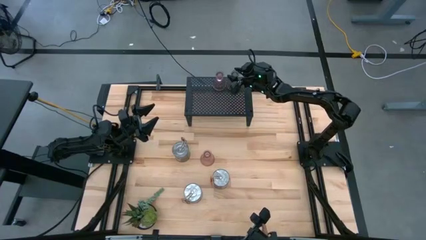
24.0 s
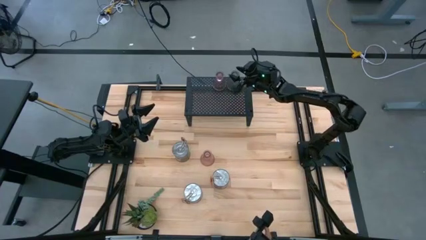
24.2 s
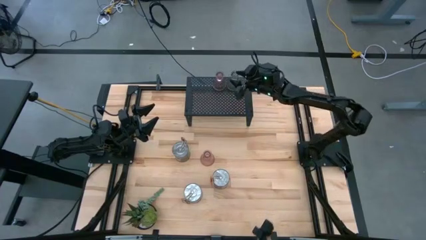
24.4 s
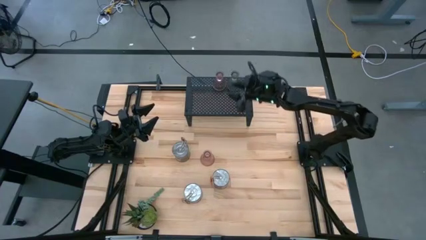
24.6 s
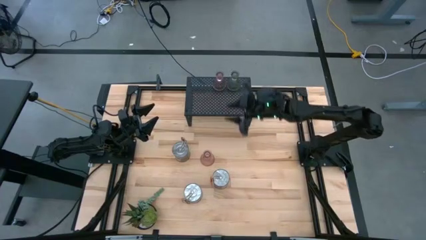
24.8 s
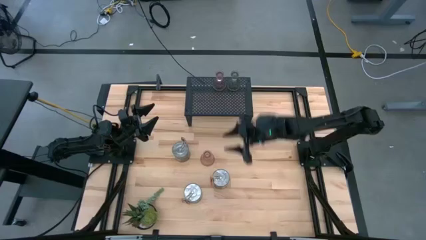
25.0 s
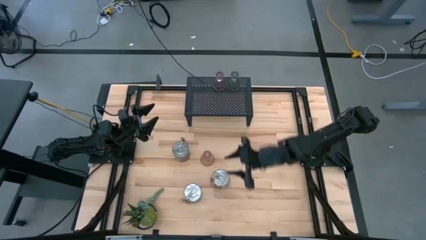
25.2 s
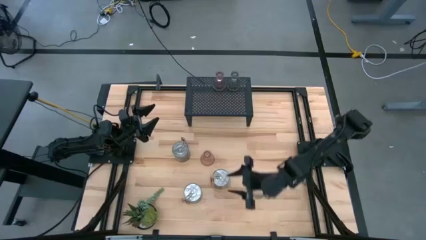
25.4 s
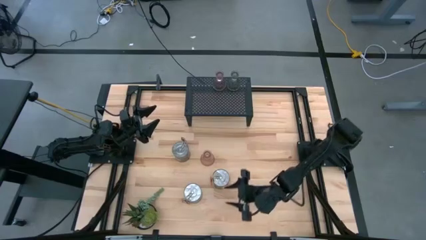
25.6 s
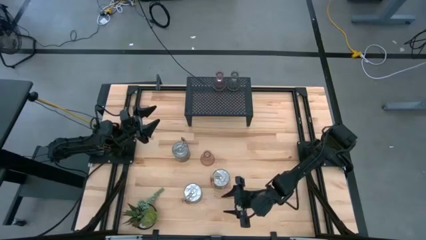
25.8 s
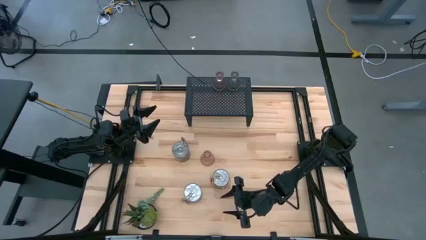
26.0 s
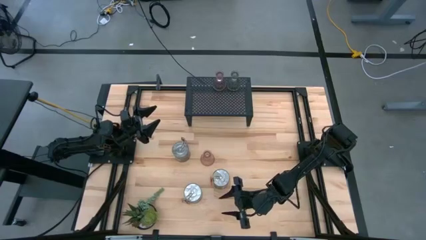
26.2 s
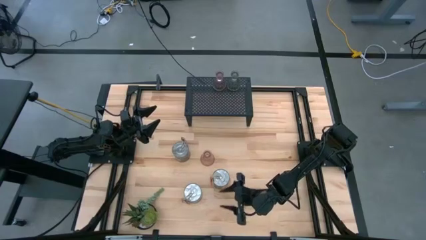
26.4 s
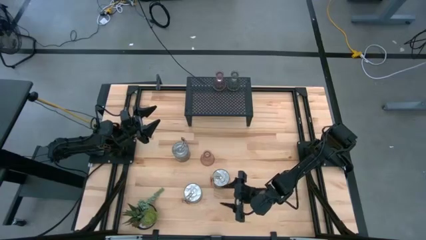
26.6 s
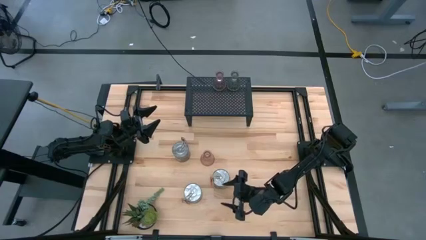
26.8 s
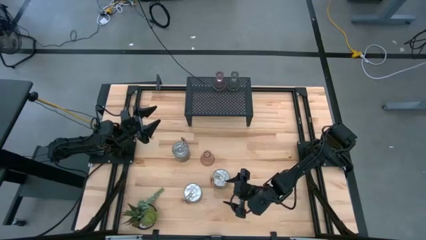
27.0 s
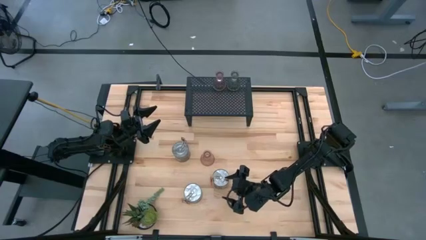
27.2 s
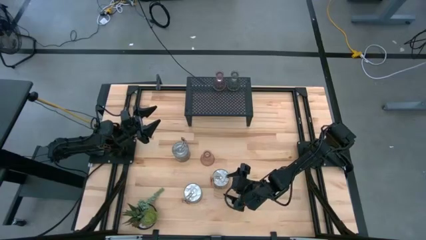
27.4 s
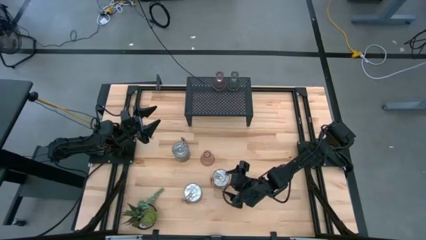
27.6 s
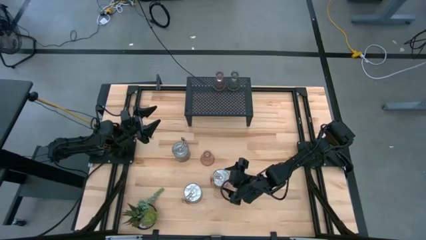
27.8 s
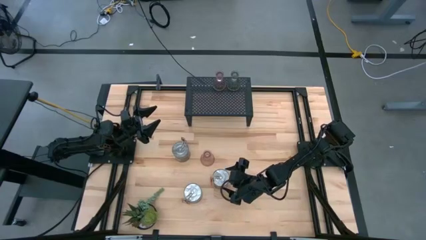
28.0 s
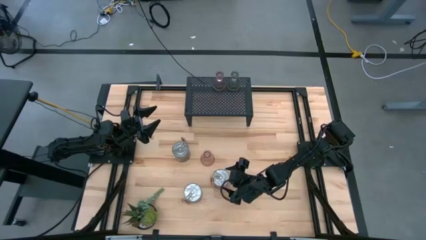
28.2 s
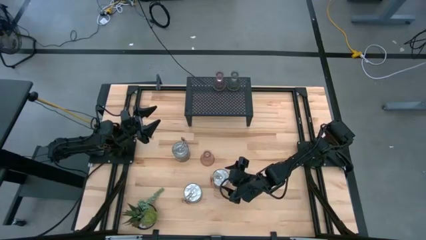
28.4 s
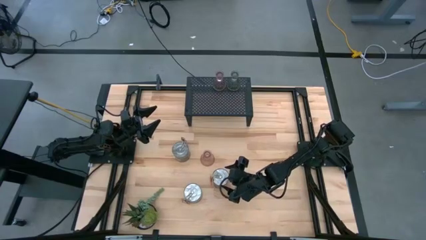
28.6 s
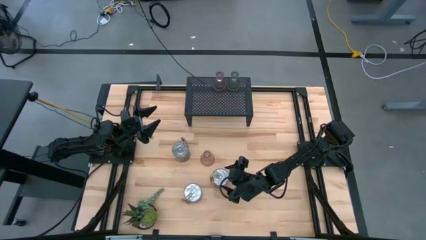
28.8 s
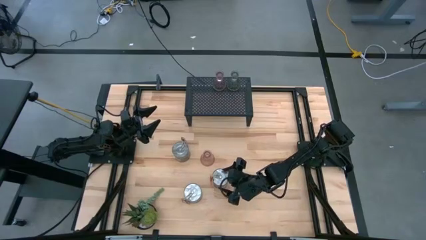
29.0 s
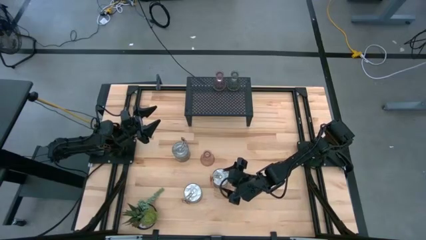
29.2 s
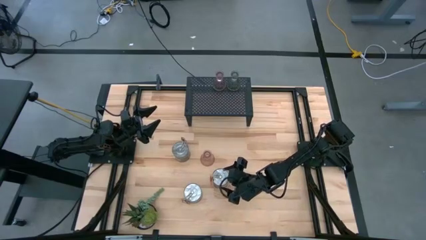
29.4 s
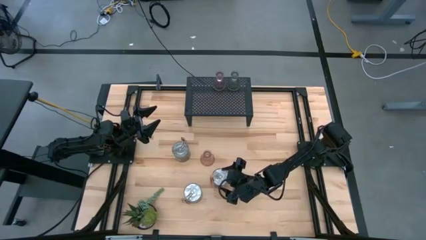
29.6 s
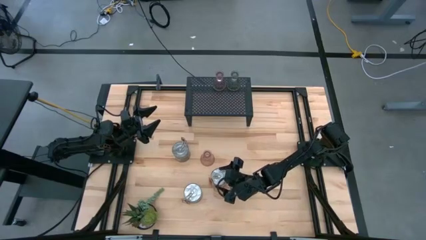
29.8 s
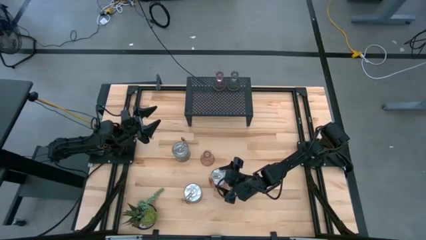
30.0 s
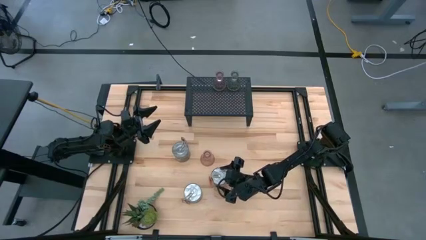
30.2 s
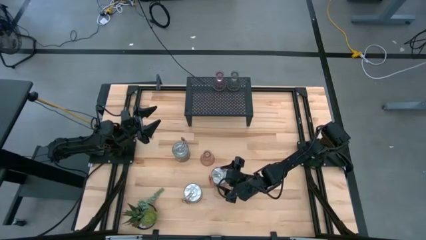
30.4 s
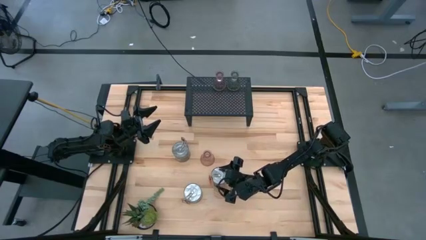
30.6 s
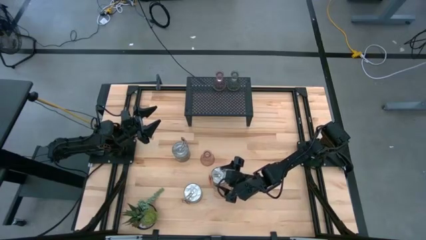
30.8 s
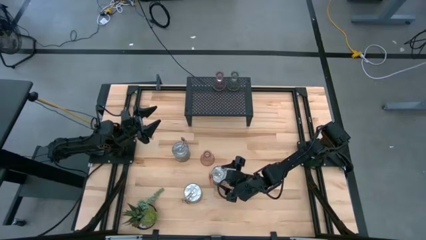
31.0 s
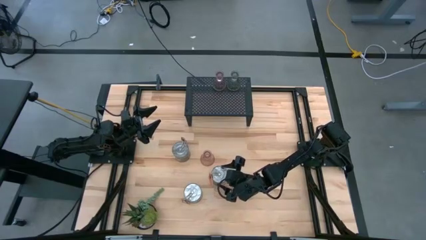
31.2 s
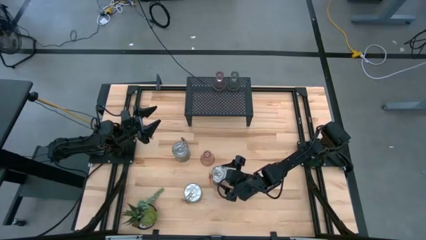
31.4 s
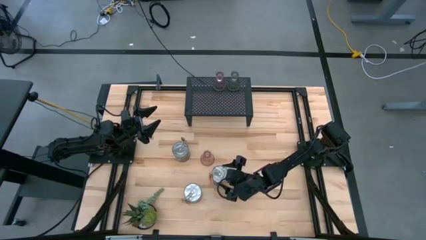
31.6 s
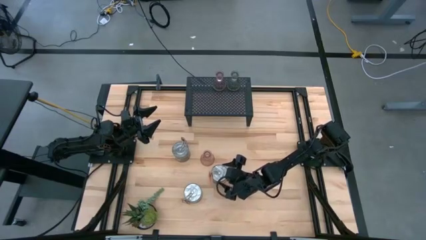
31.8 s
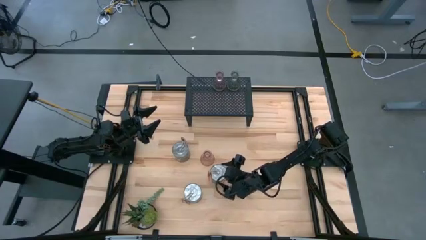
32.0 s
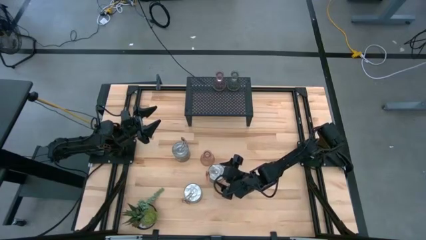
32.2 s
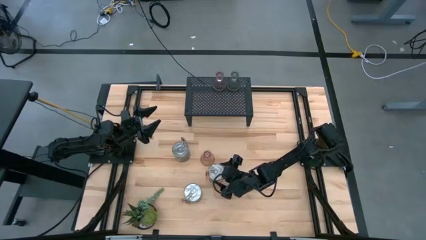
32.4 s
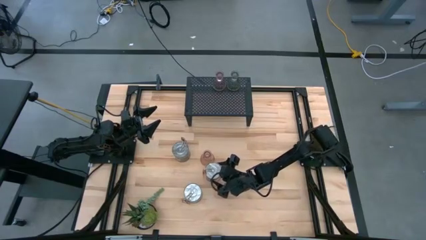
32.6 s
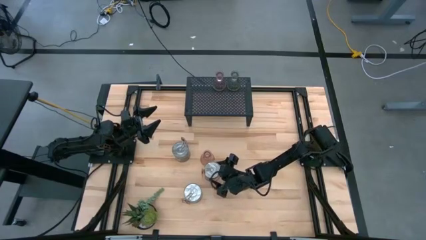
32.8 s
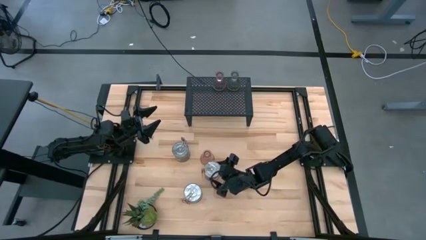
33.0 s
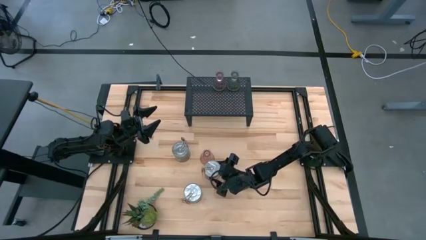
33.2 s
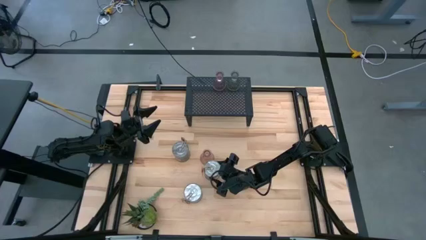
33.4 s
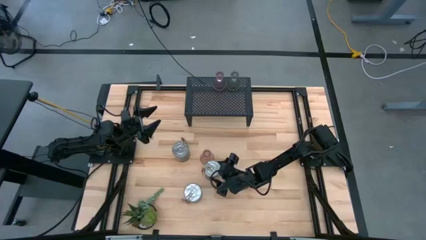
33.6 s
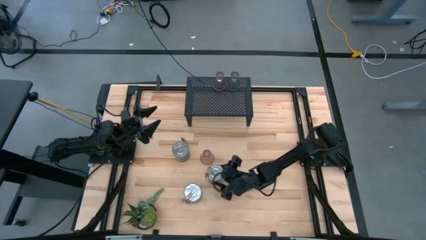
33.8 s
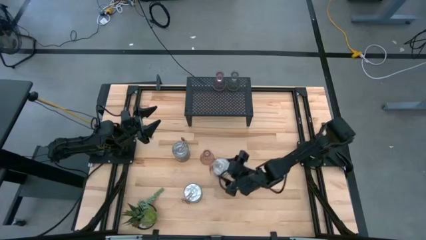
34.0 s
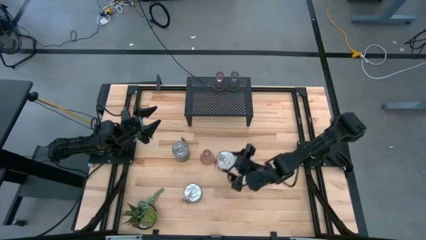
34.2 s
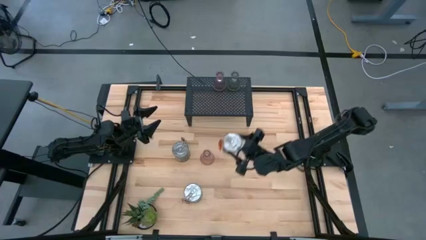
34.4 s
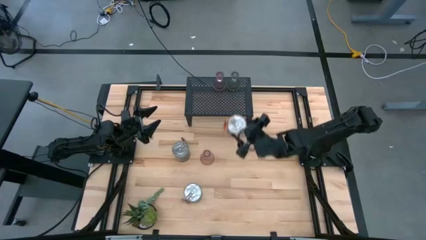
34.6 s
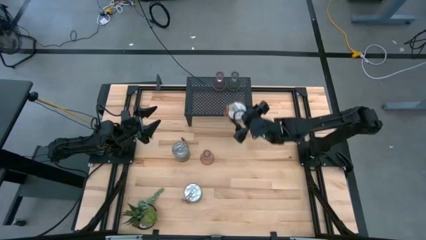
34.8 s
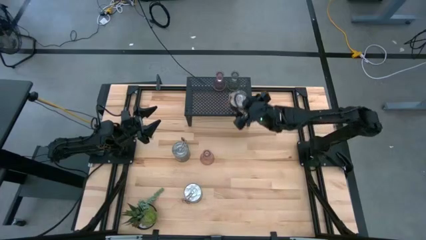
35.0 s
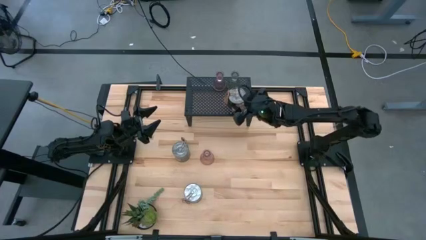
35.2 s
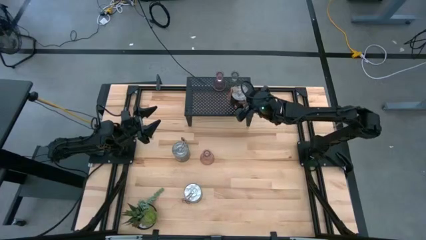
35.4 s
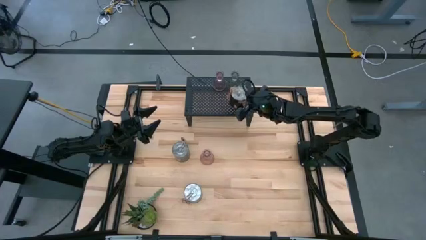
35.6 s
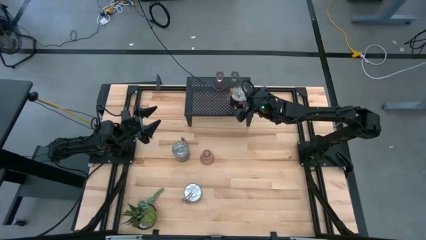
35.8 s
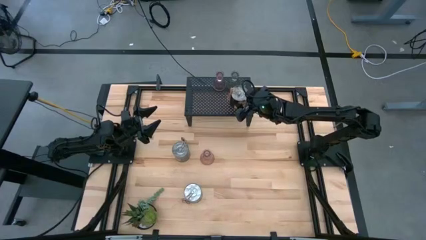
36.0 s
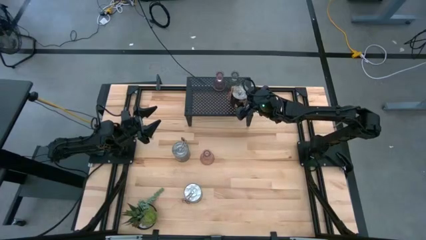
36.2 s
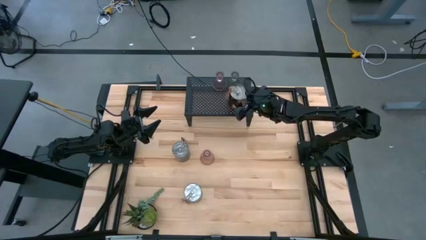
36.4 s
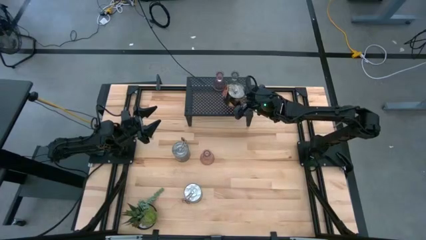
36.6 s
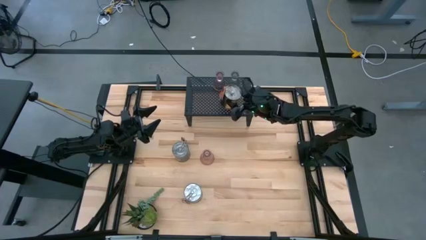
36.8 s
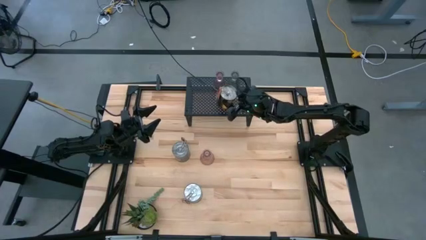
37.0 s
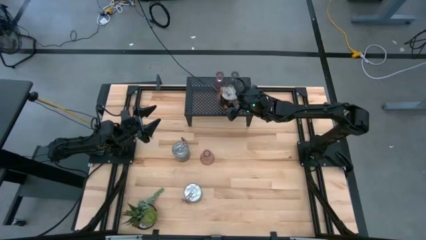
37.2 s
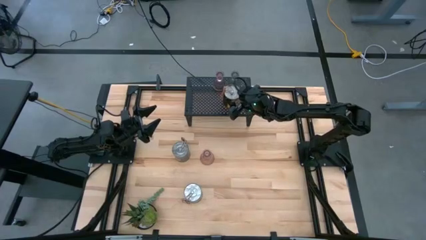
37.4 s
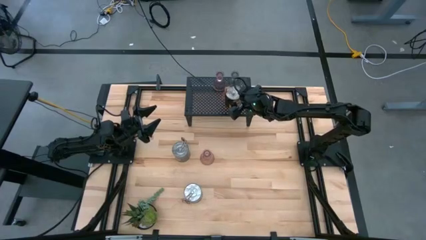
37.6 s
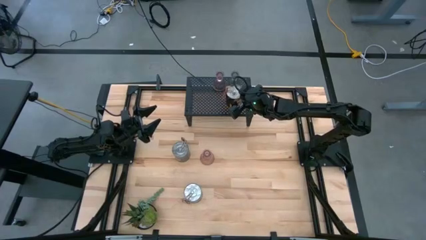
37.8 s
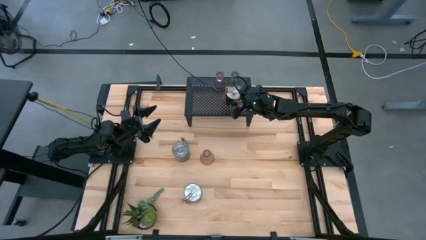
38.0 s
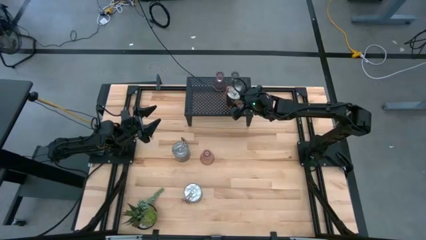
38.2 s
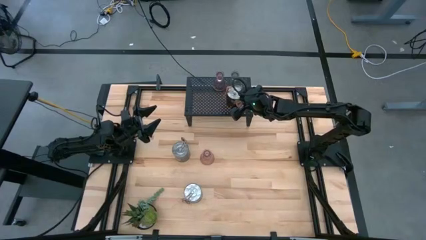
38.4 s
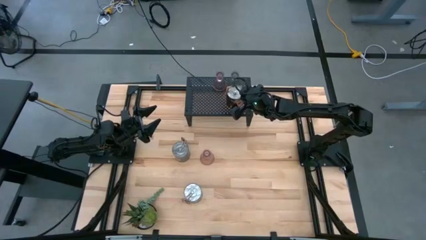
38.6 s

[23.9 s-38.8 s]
Task: Pick & Place candle stick holders
Put the middle silver scented candle on the shelf

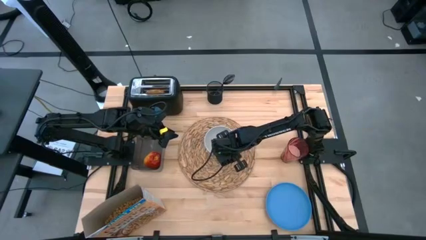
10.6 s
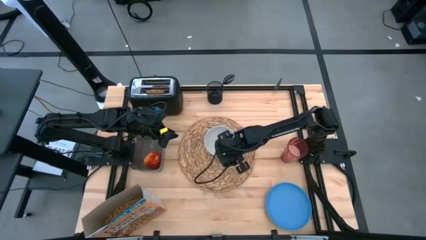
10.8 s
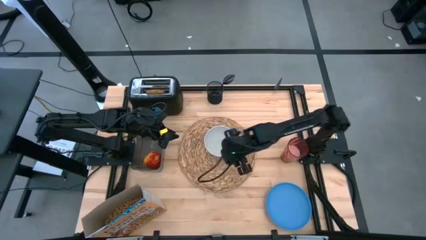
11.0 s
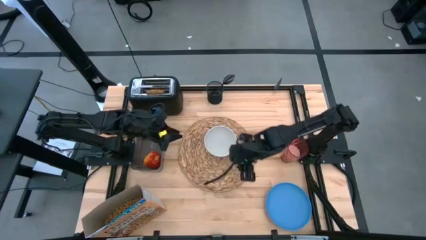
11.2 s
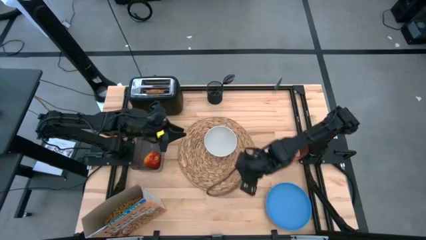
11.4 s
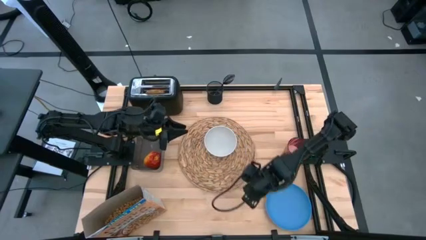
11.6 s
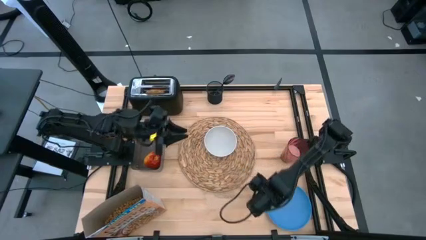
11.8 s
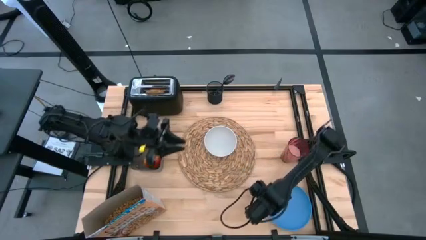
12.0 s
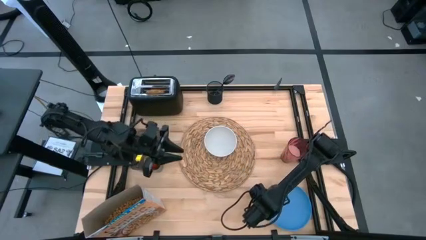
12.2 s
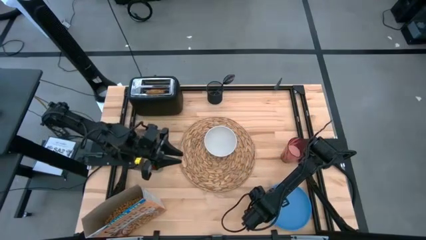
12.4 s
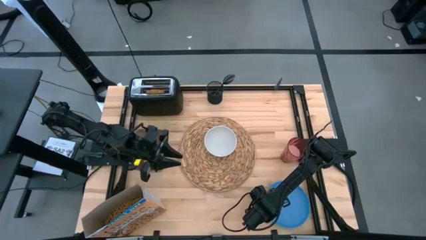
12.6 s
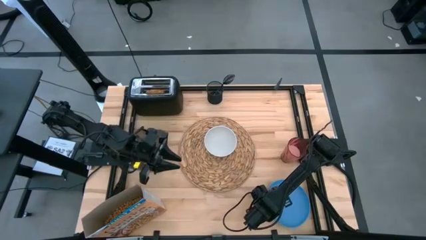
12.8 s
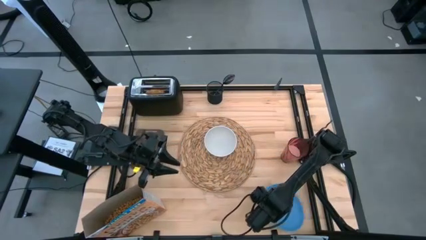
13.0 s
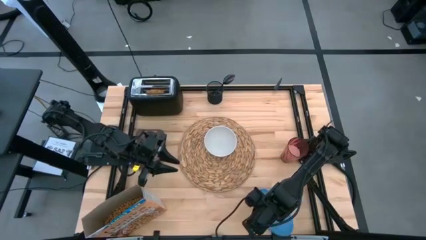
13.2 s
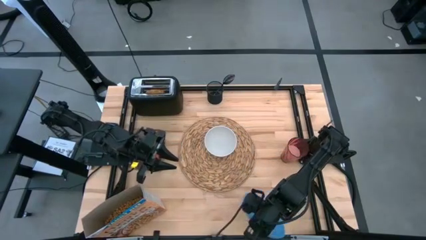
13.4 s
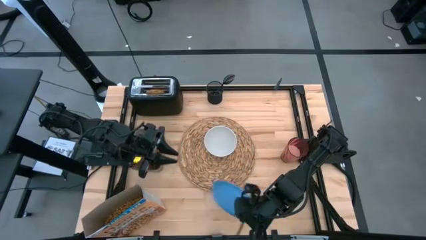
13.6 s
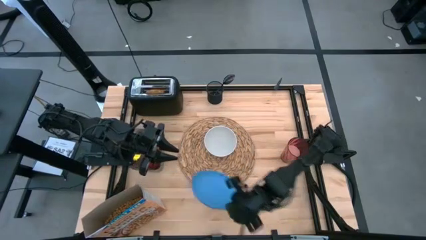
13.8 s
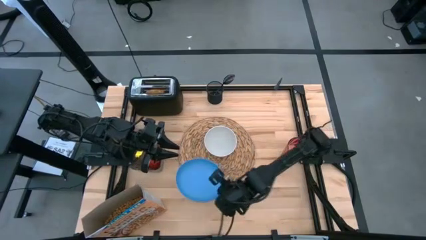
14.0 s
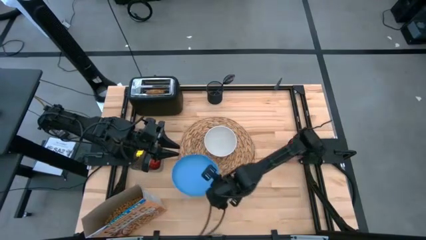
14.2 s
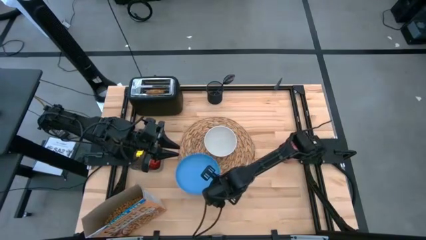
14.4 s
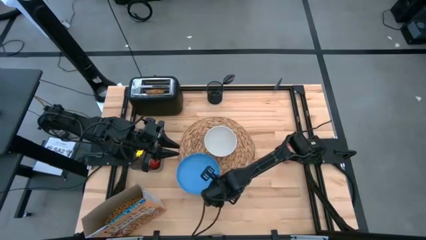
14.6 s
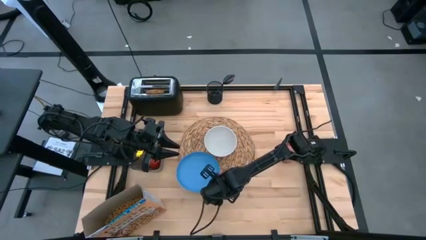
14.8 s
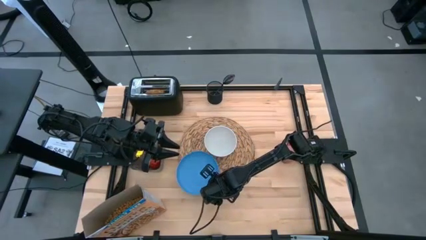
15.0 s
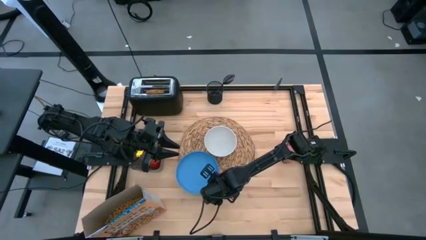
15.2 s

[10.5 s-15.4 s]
Task: Arrange a breakfast setting
Put the blue plate on the placemat to the bottom left of the white bowl
